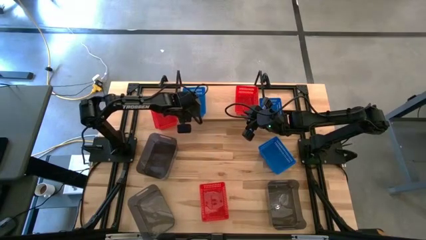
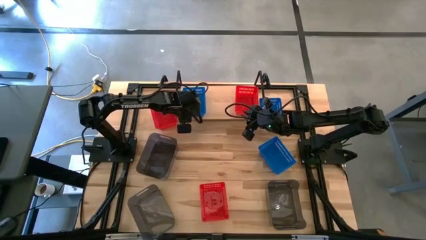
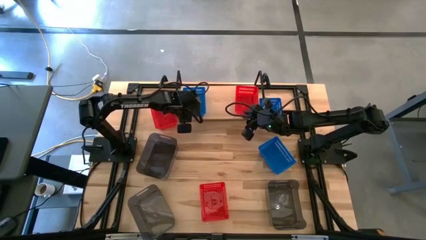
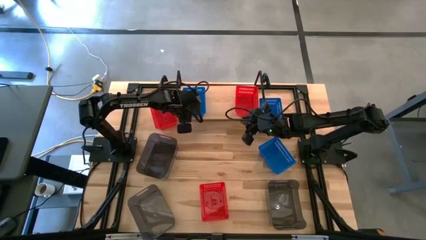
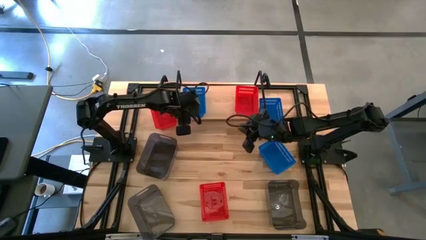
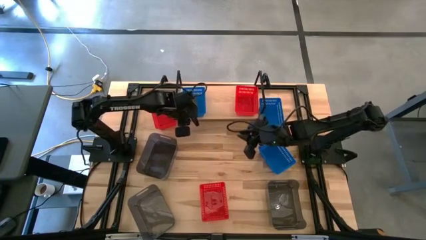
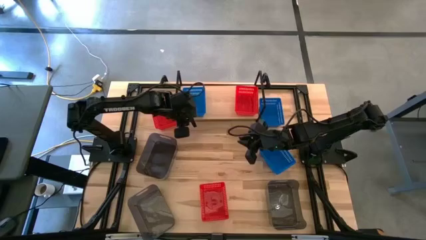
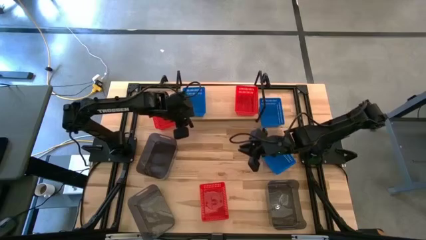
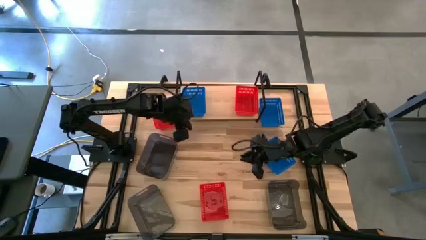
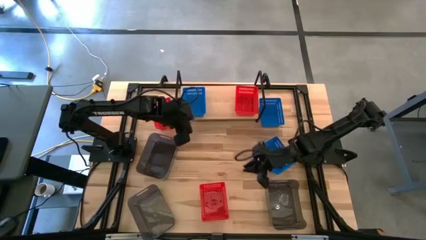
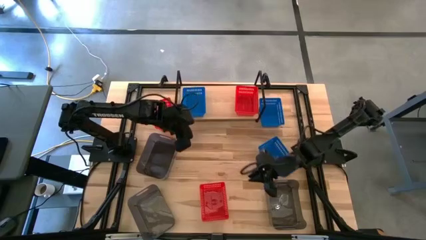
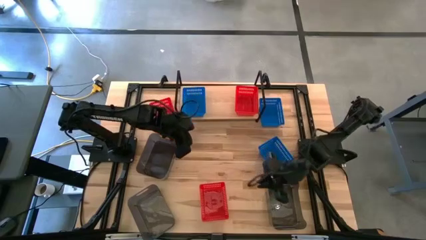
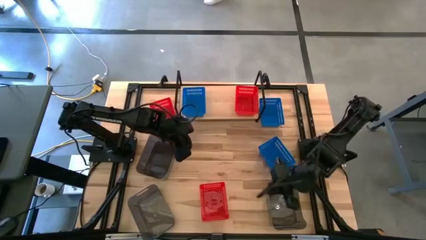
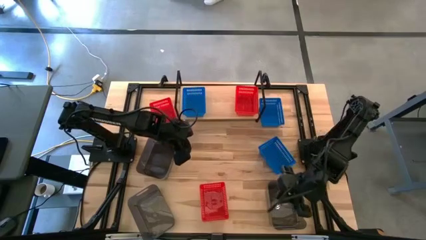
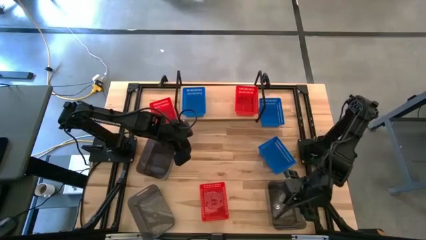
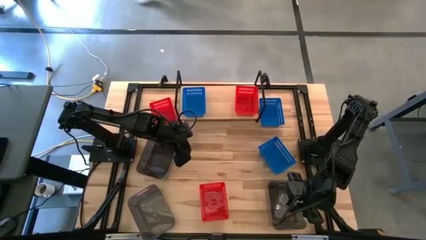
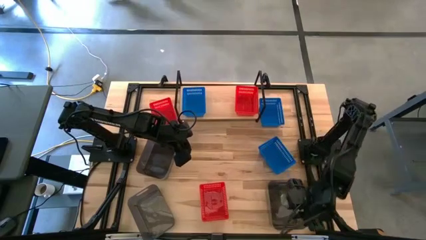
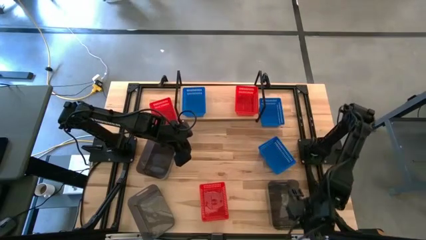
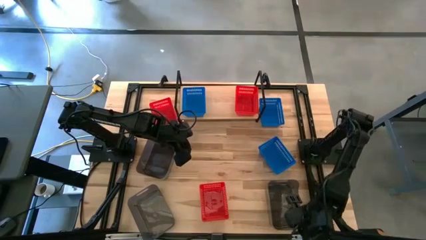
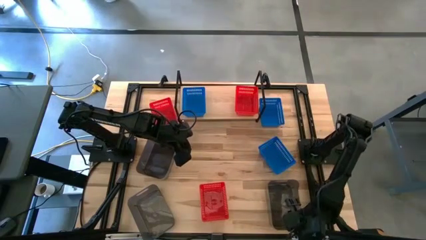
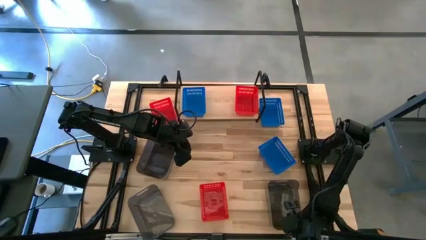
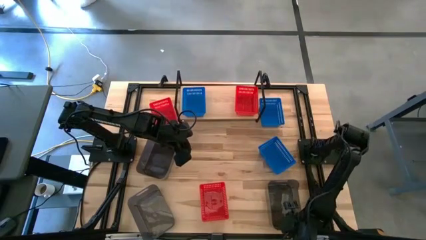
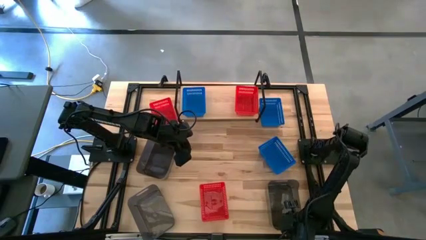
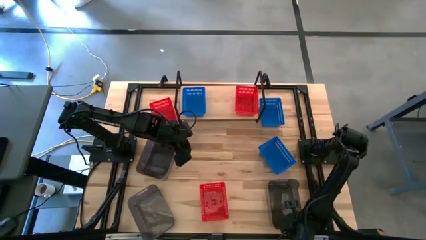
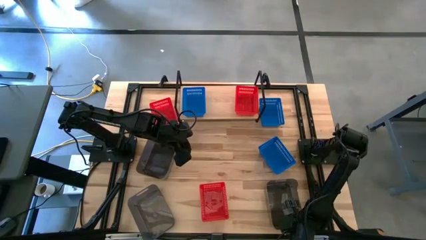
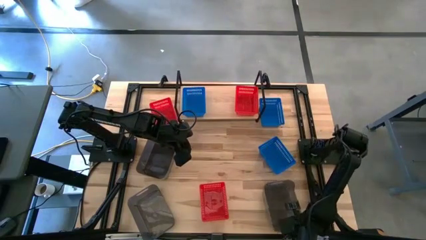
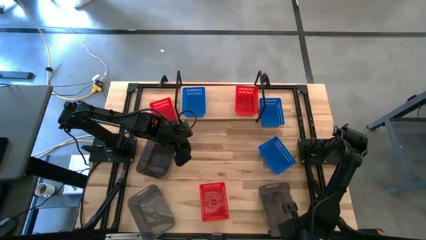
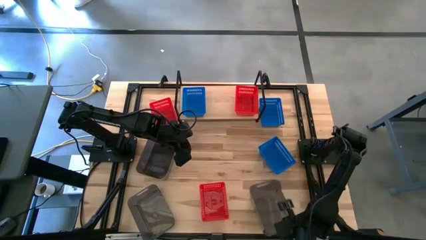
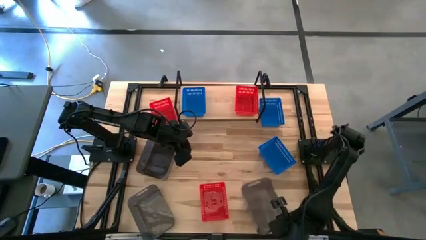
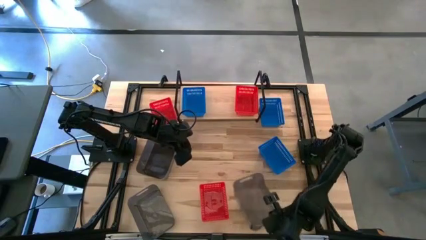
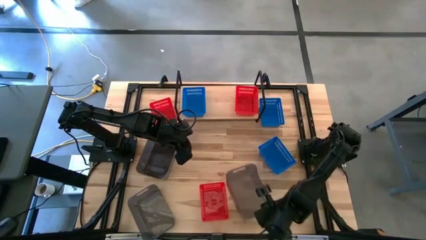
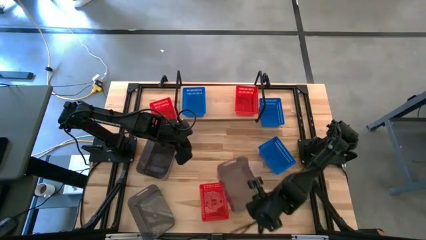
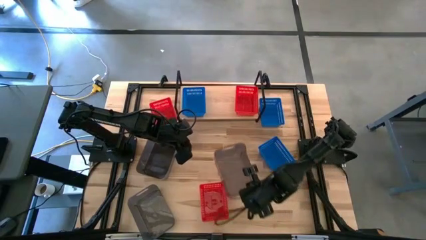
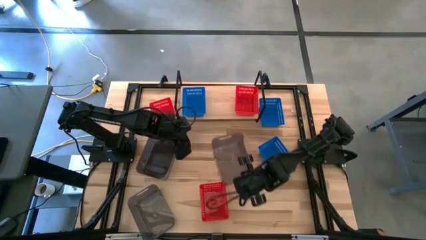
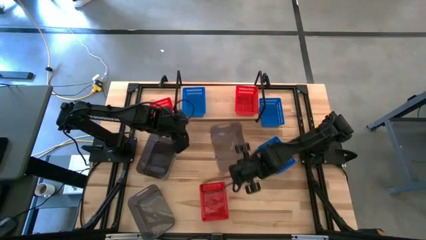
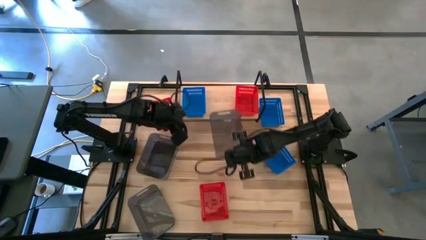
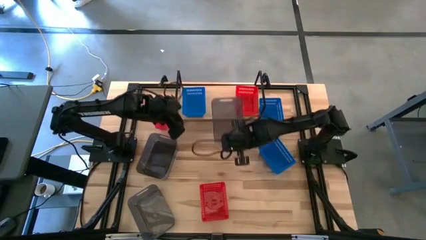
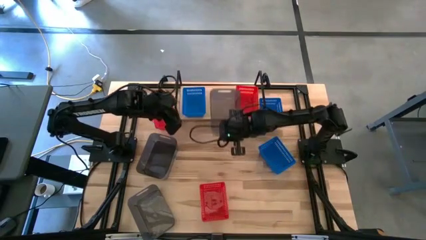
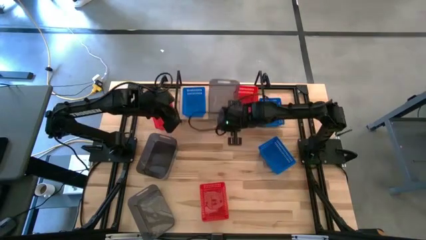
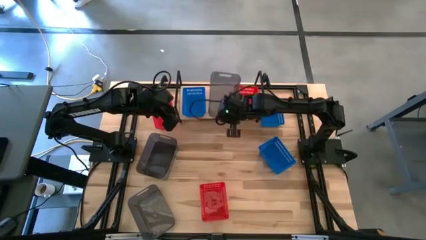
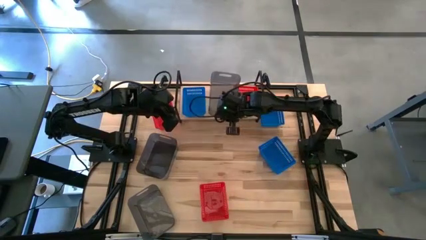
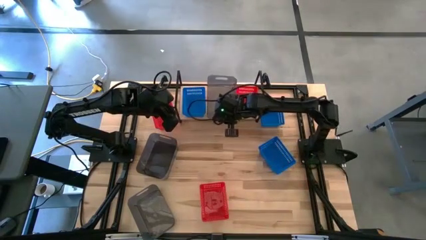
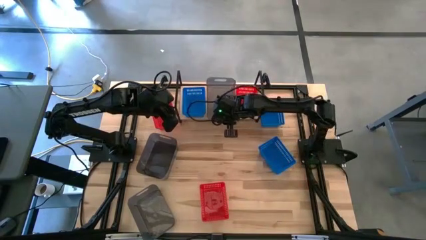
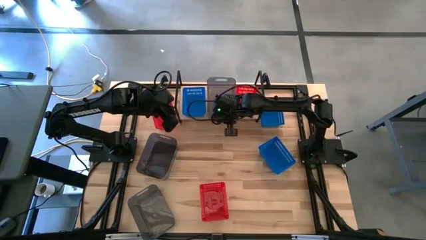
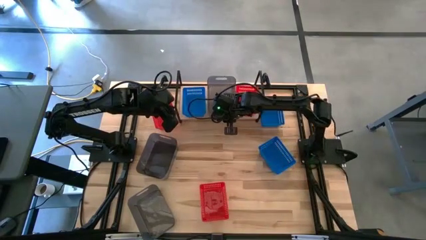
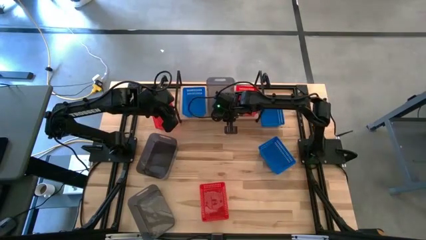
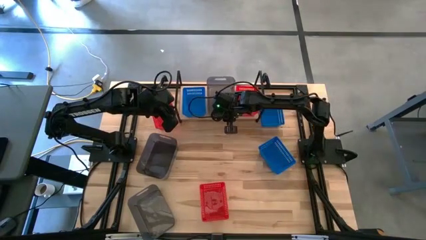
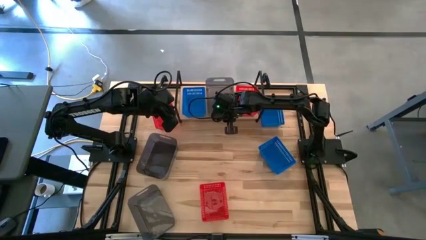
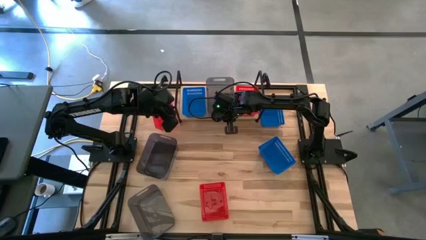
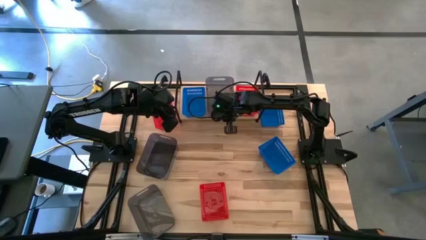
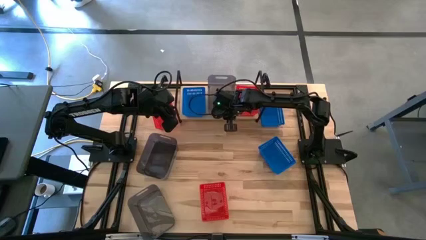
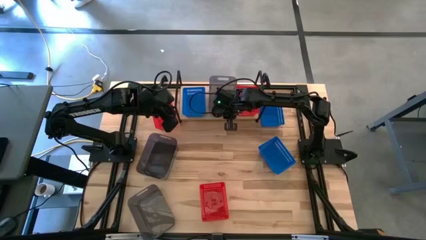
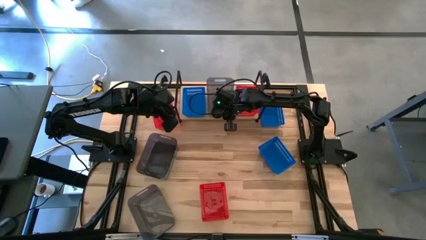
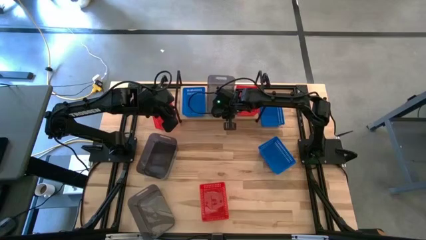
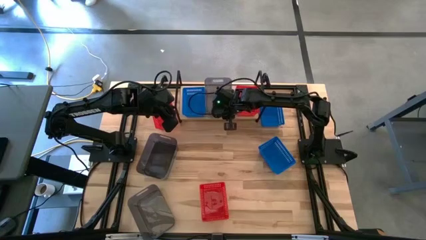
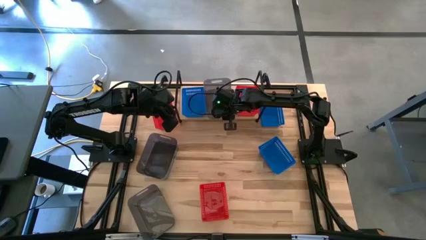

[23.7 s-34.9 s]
Task: Stack baskets on shelf by color
Put the bottom right black bin on the shelf
